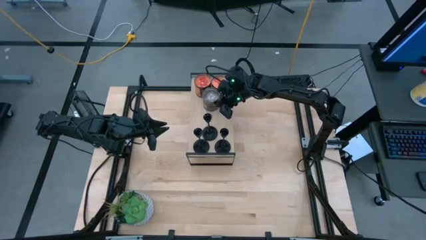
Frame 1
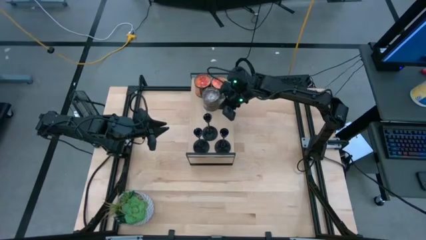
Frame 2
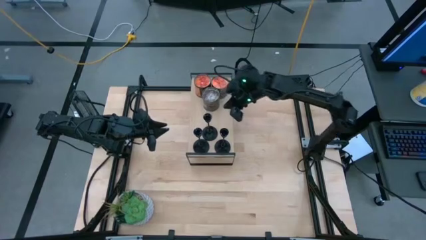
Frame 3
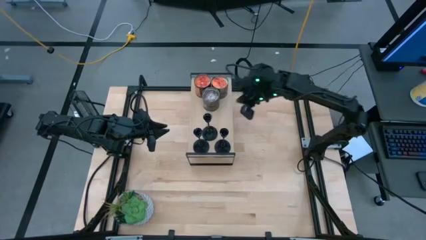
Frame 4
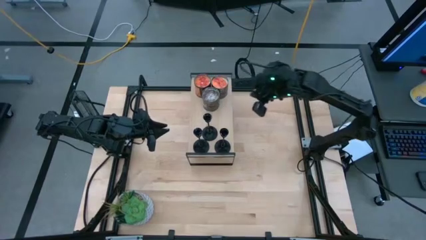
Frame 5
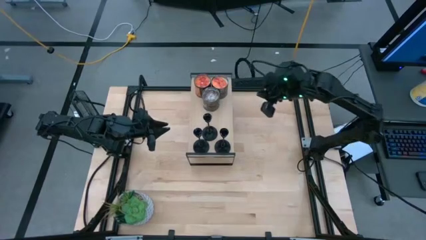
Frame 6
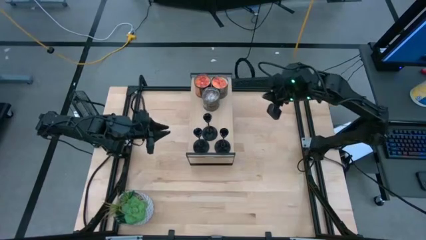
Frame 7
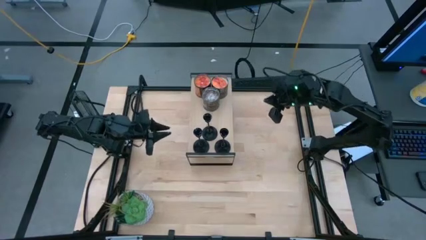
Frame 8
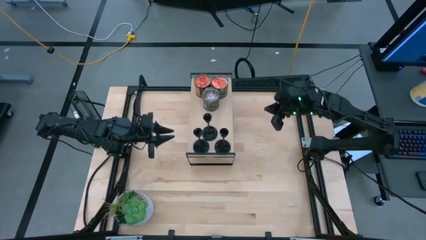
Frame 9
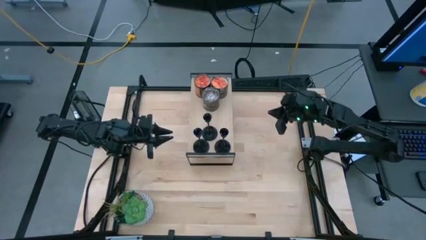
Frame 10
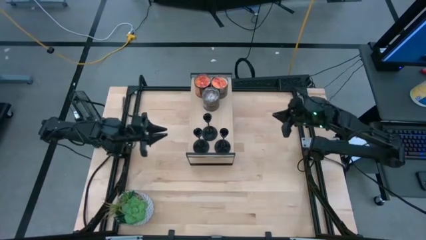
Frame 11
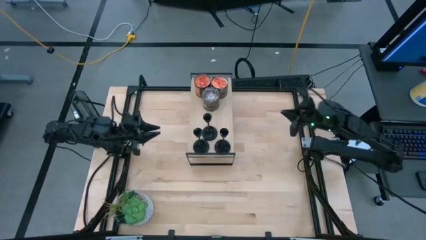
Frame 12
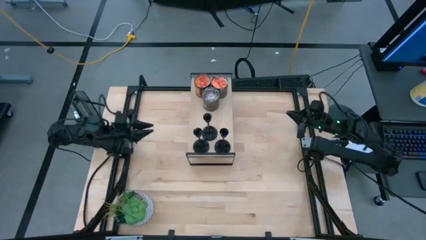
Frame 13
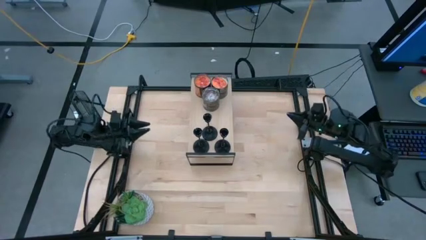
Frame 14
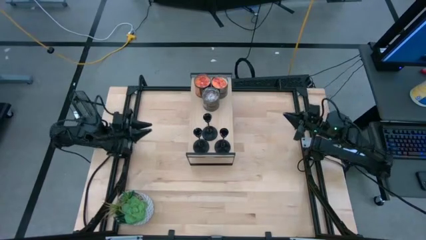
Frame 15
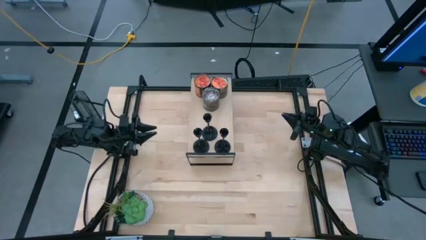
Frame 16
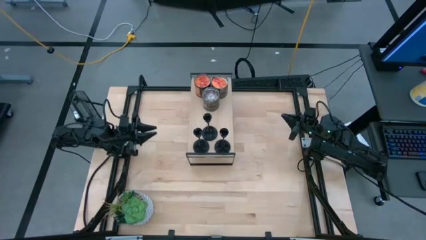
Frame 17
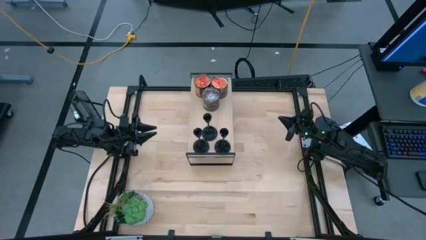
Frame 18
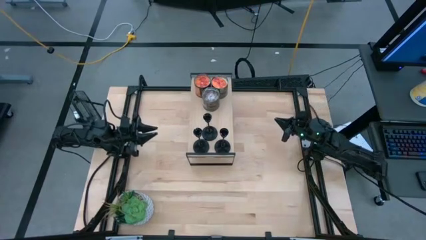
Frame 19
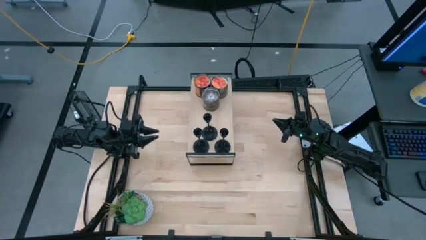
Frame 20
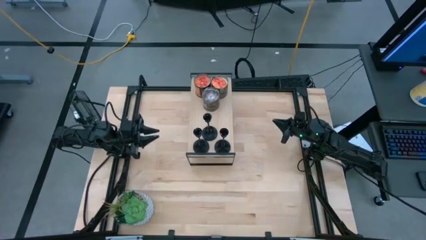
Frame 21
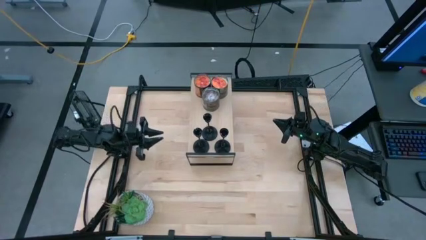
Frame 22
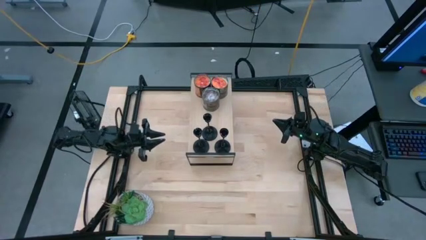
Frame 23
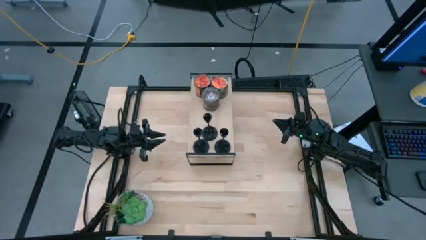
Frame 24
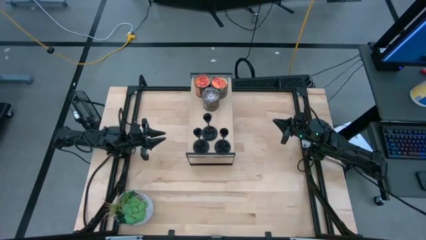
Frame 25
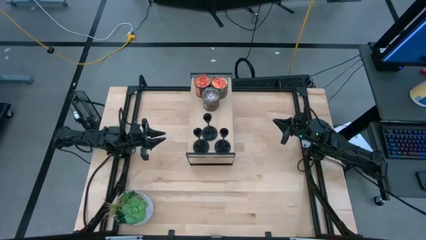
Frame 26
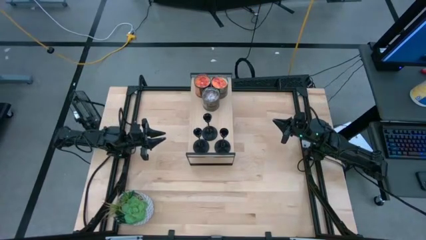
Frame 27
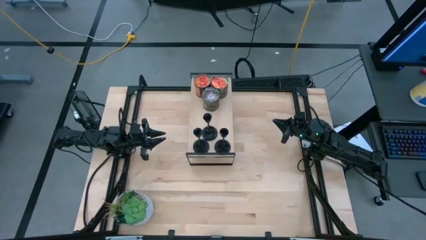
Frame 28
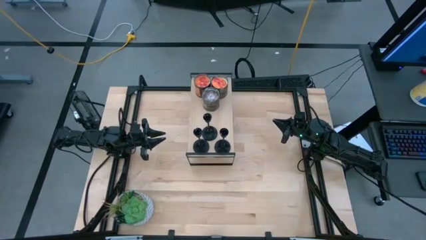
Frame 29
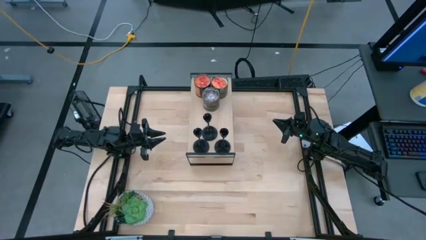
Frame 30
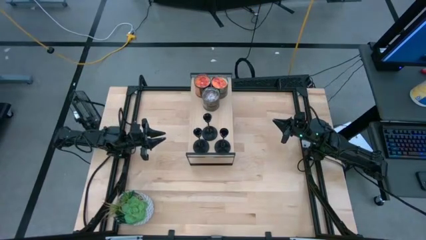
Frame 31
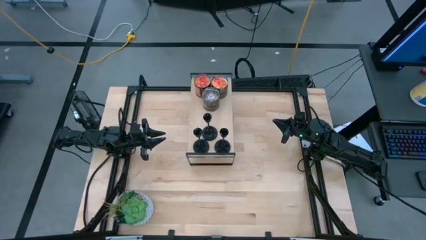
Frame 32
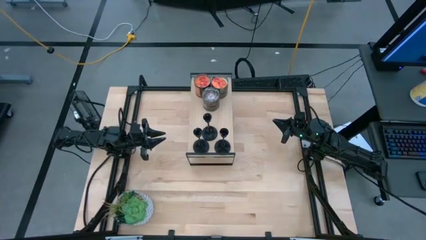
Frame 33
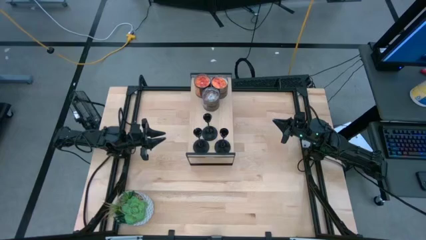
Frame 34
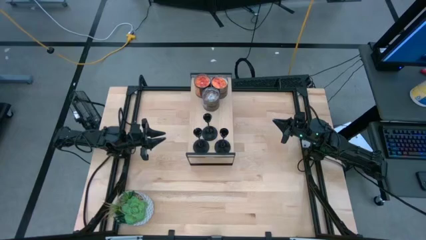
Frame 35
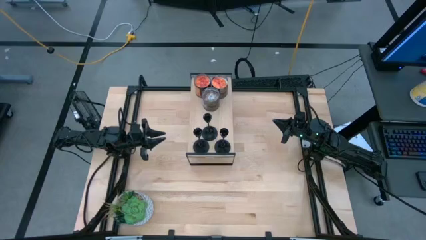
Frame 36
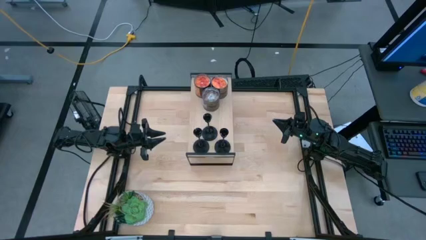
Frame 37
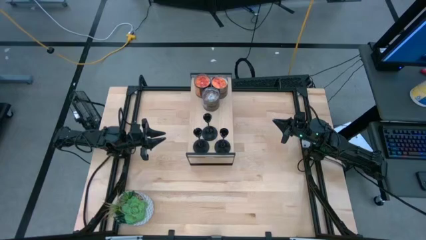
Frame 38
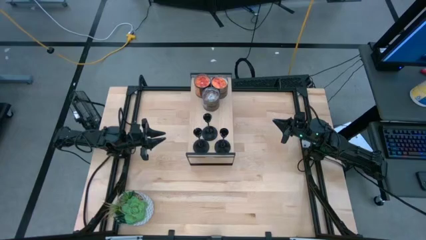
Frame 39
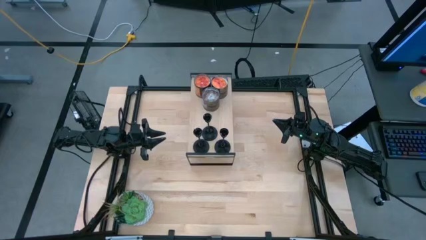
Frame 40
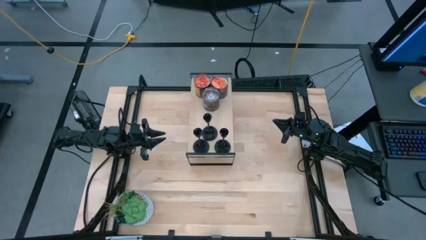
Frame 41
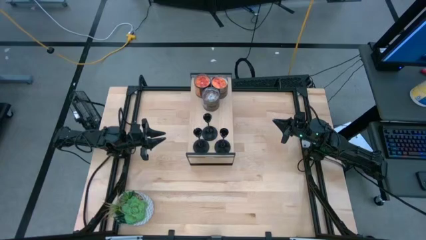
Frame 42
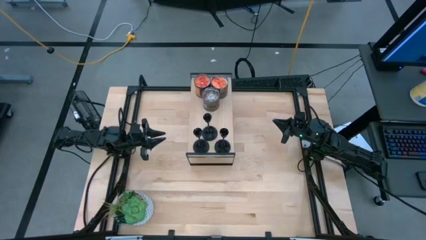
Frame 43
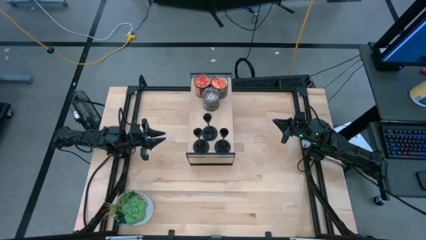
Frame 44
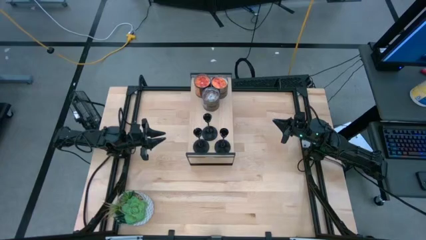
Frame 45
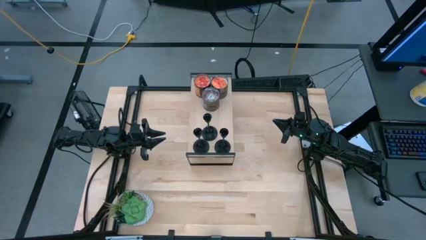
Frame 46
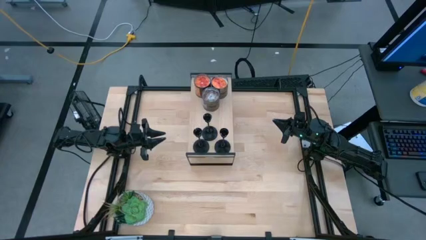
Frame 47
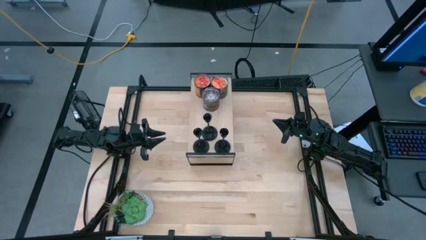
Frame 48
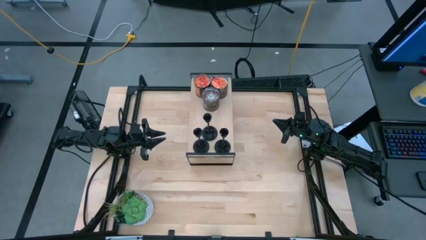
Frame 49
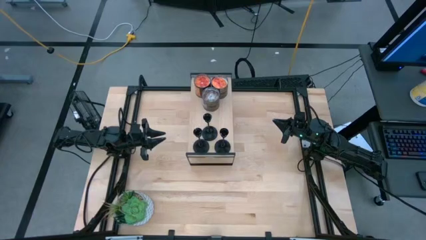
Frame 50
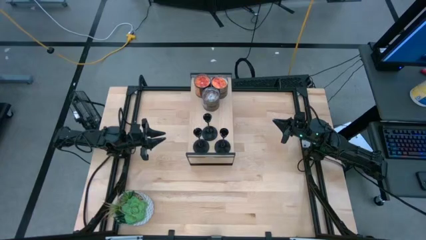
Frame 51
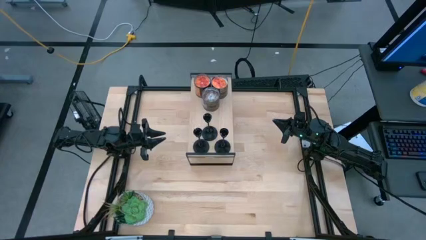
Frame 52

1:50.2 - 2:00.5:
Task: Pick & Place candle stick holders
Return to Home Position

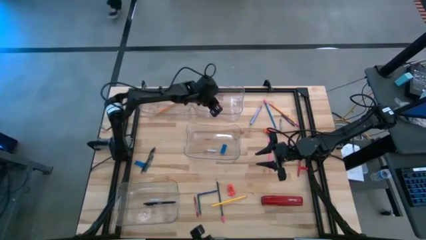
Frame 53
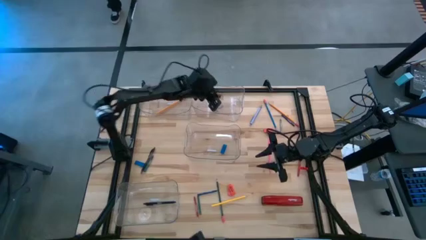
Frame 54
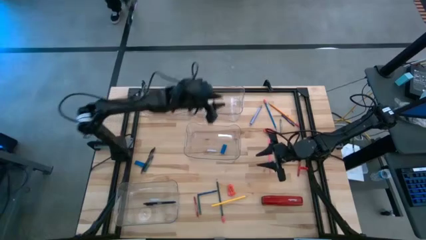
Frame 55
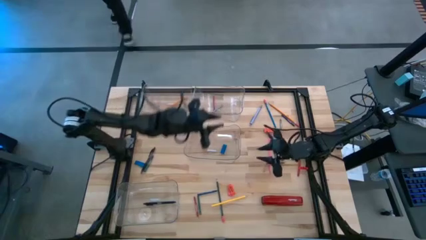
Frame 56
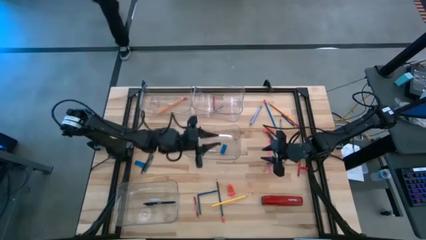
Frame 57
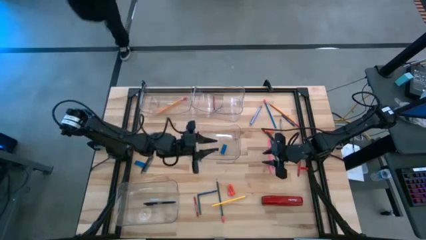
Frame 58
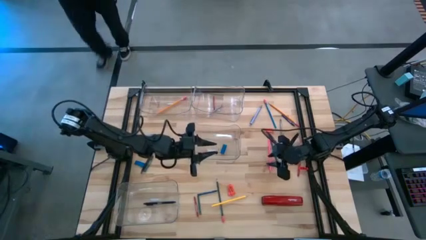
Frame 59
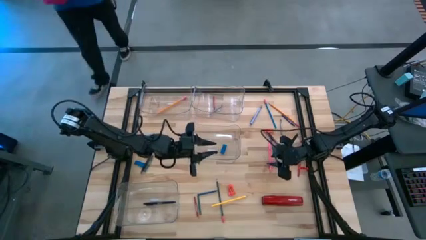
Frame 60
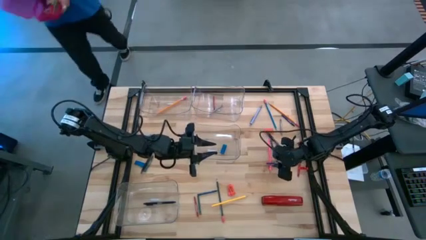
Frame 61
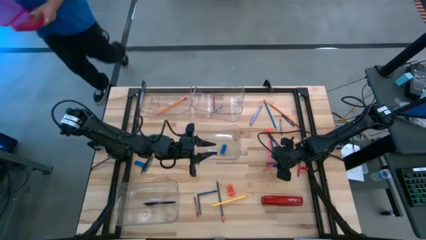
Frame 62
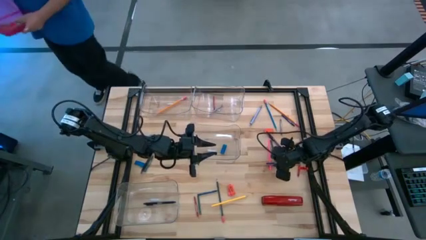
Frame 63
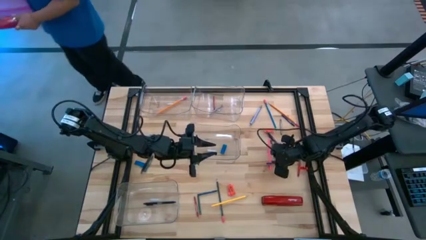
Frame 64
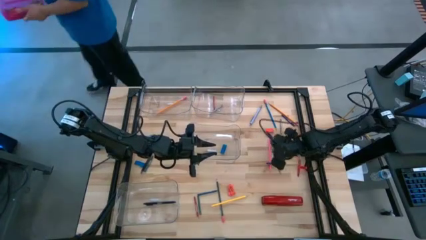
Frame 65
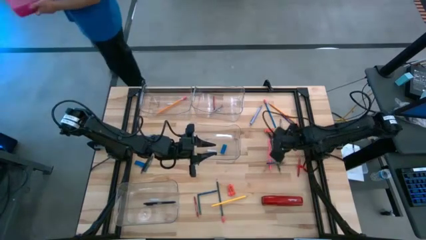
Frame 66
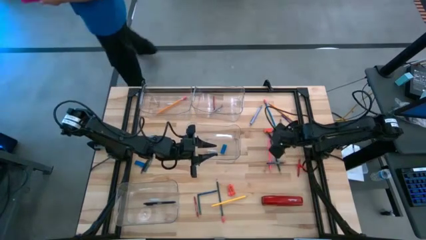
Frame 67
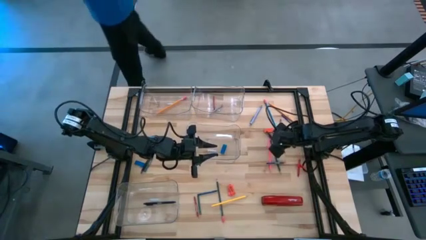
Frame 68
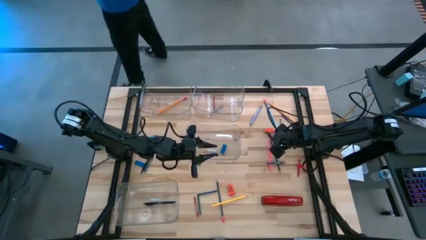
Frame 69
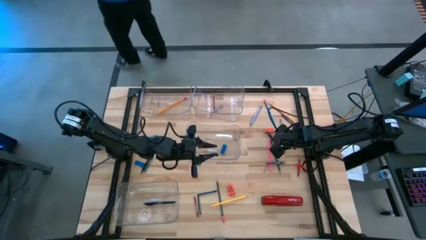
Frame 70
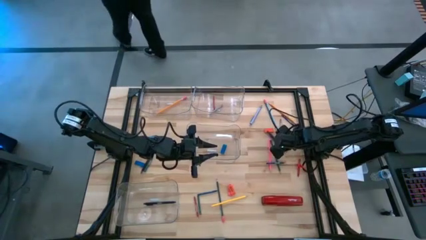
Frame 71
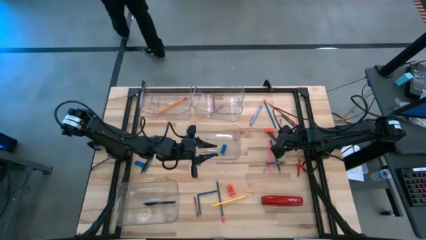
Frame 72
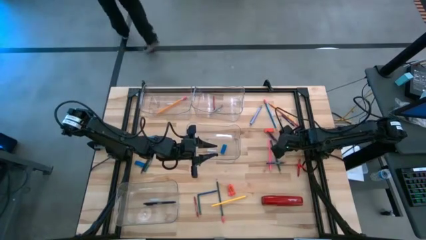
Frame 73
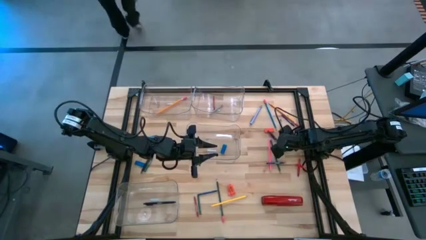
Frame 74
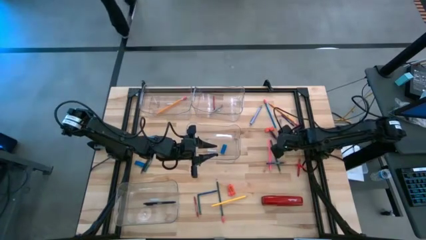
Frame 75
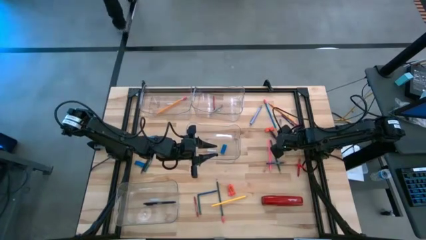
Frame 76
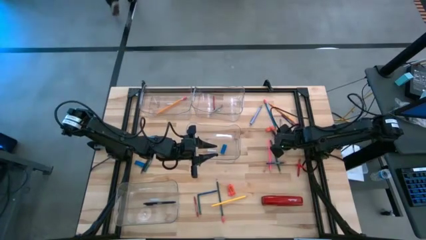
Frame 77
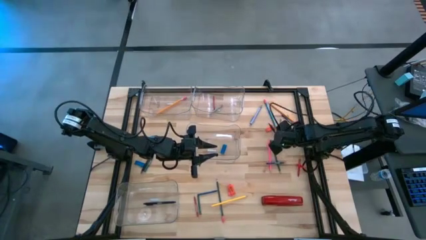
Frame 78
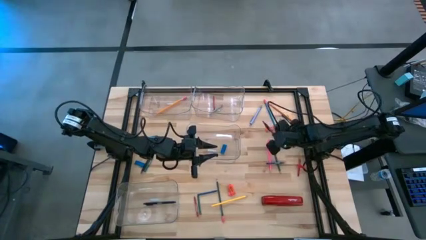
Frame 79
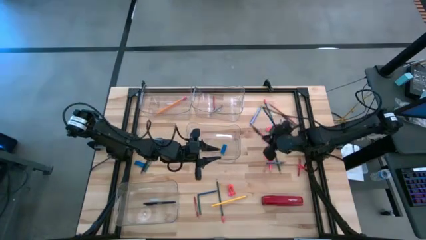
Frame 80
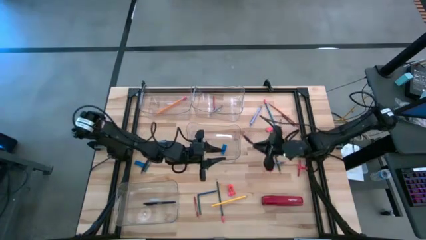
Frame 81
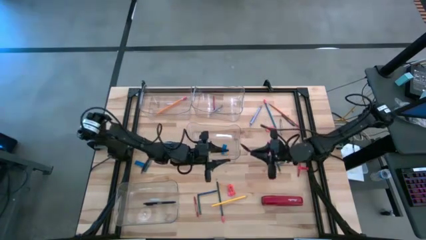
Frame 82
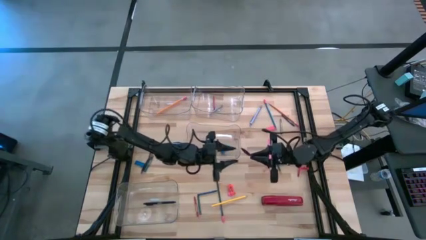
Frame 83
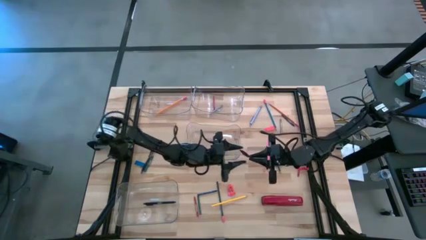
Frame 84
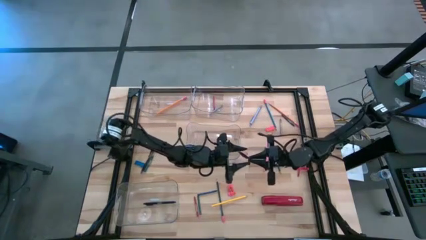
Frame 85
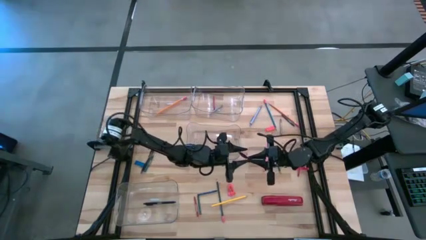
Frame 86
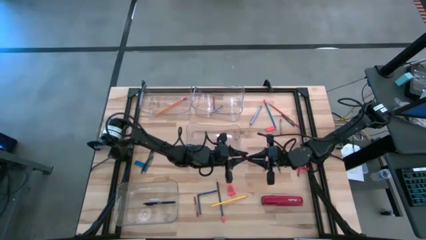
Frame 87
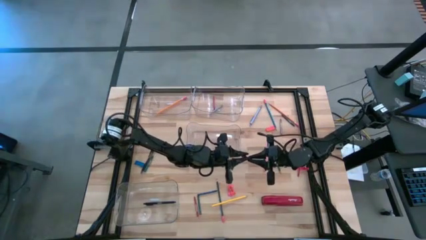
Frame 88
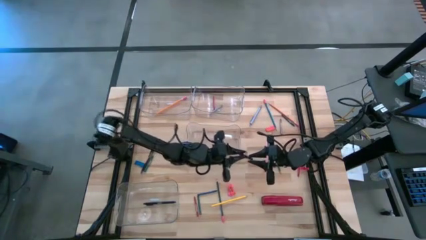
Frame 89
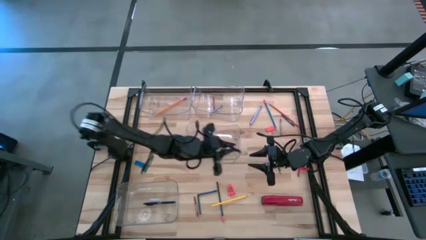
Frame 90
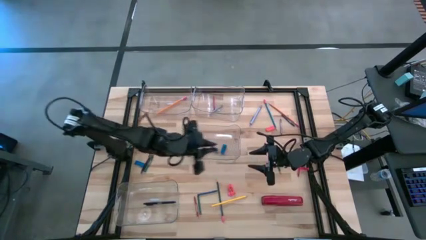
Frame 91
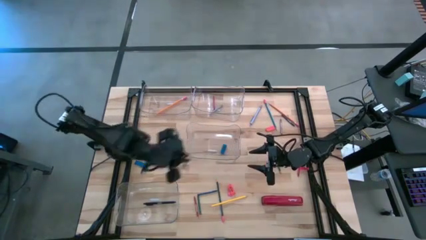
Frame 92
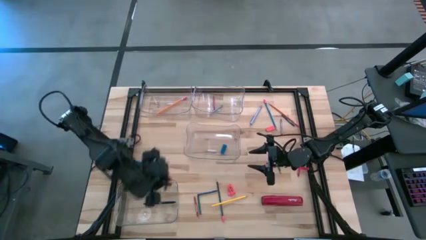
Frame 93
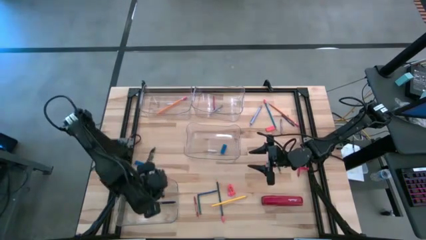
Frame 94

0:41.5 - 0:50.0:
Task: Sort crayons/erasers/pens/pencils in bins
Put the violet pen into the bottom transparent bin
